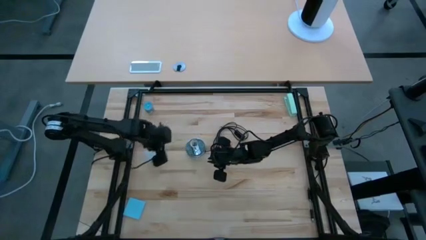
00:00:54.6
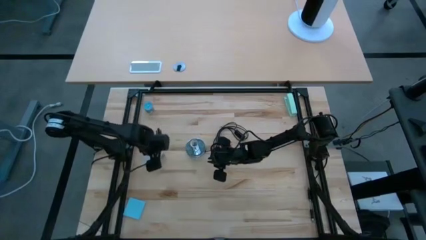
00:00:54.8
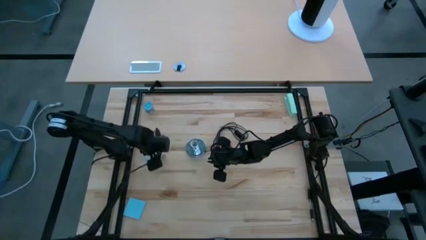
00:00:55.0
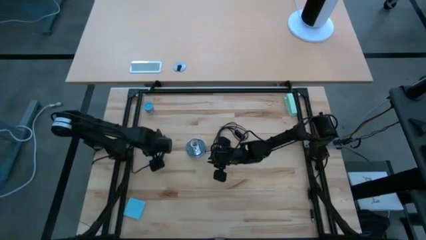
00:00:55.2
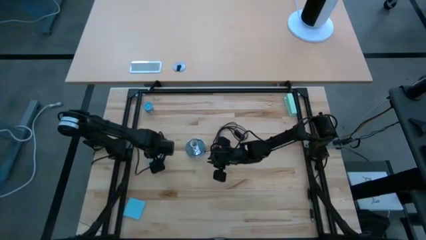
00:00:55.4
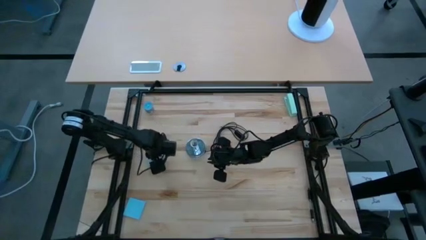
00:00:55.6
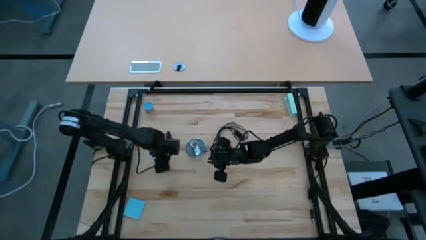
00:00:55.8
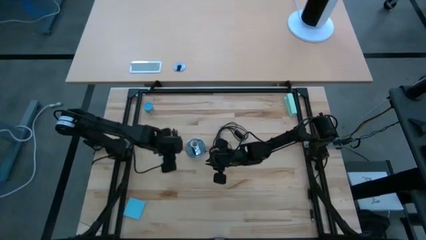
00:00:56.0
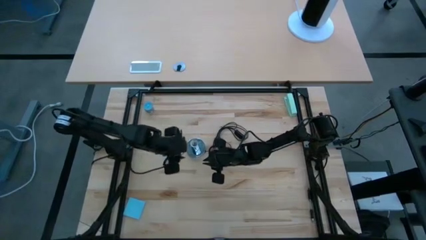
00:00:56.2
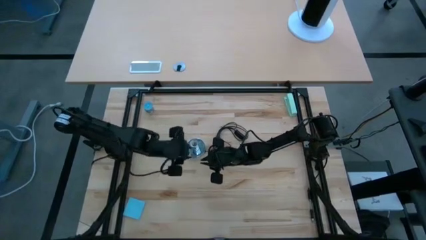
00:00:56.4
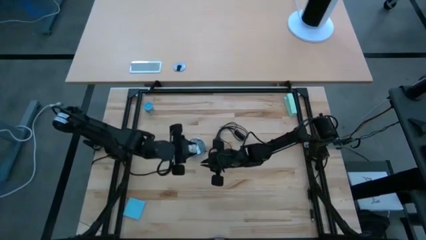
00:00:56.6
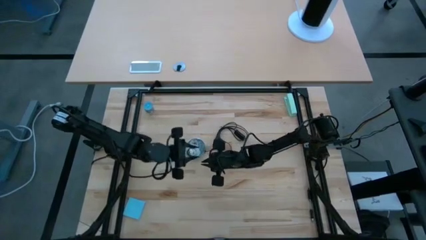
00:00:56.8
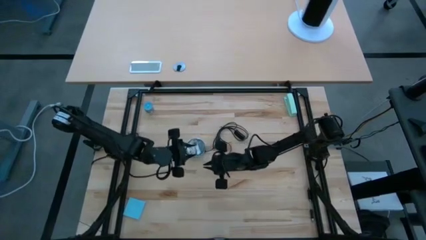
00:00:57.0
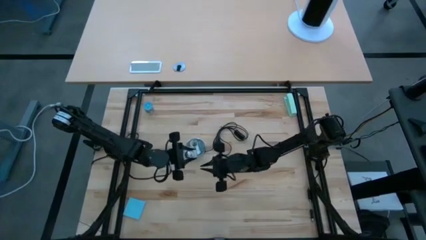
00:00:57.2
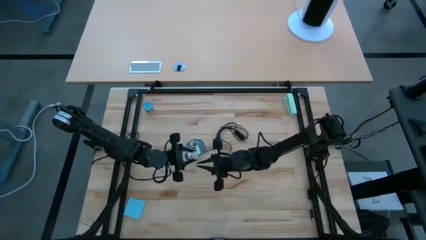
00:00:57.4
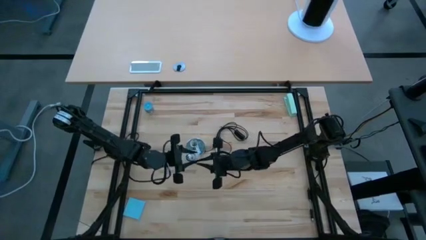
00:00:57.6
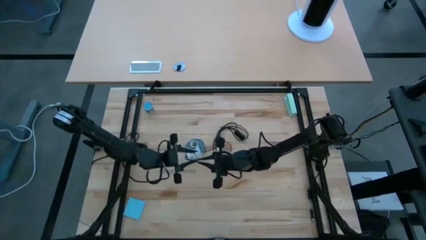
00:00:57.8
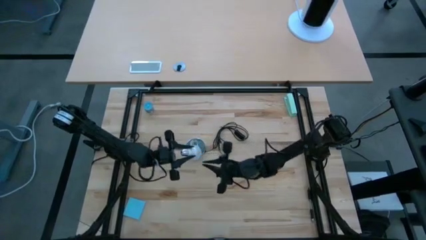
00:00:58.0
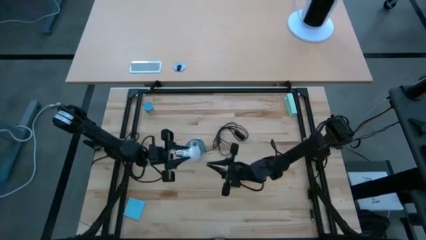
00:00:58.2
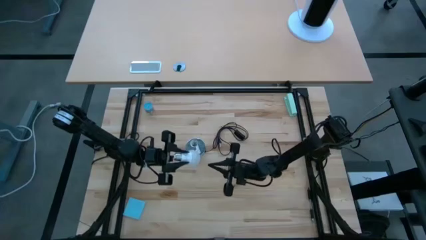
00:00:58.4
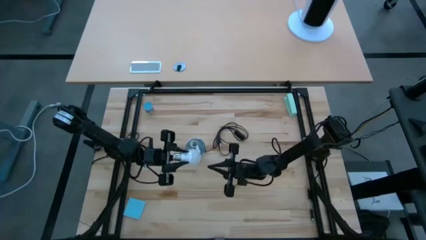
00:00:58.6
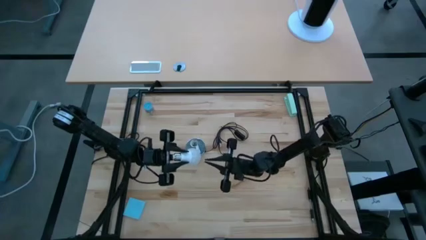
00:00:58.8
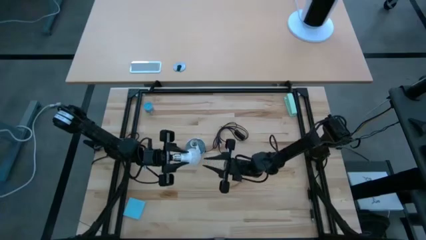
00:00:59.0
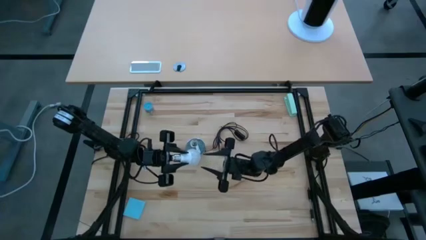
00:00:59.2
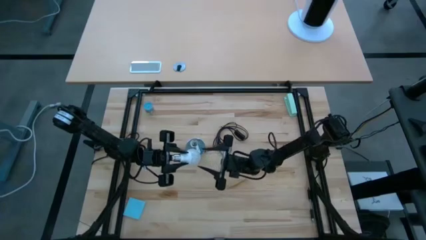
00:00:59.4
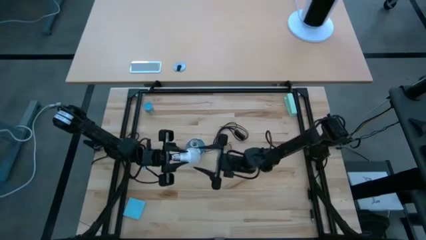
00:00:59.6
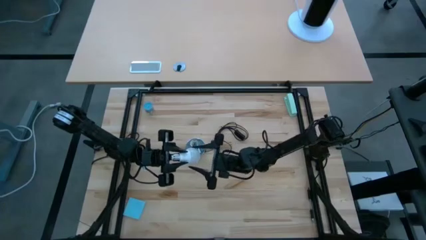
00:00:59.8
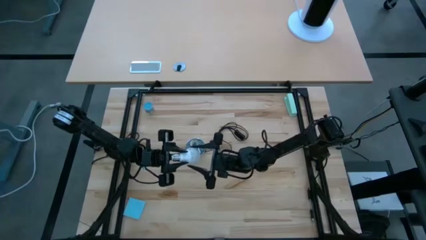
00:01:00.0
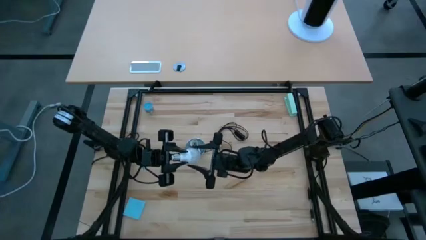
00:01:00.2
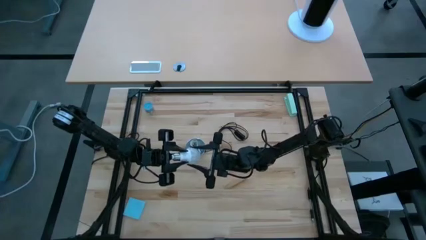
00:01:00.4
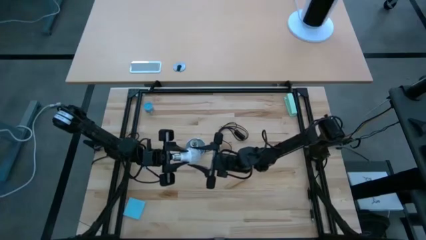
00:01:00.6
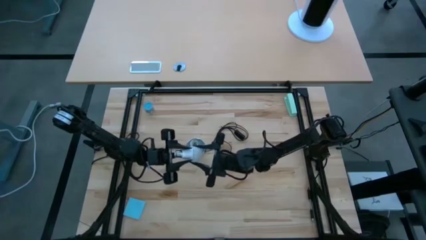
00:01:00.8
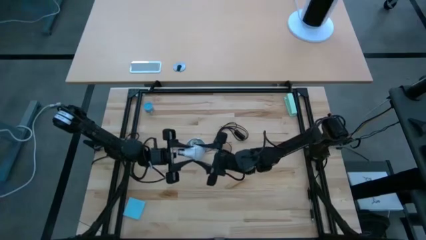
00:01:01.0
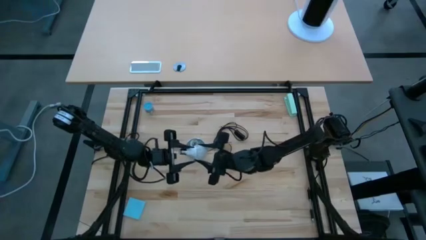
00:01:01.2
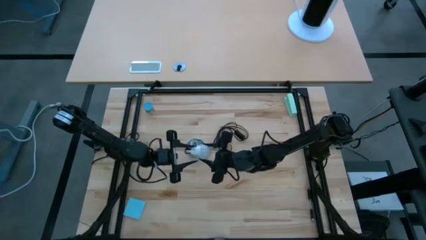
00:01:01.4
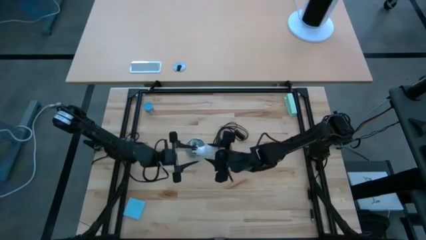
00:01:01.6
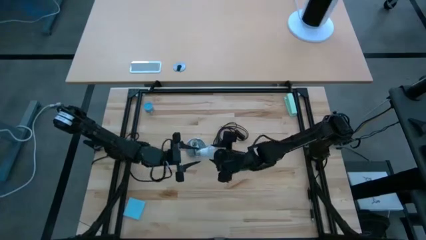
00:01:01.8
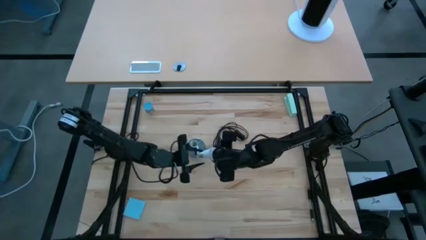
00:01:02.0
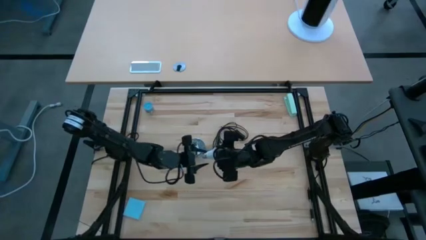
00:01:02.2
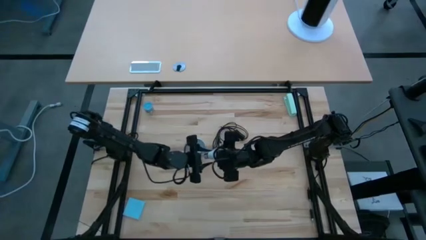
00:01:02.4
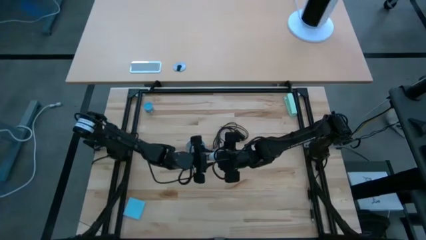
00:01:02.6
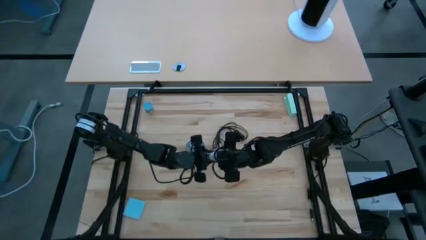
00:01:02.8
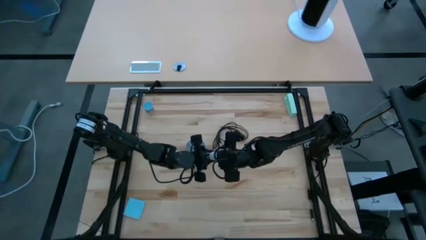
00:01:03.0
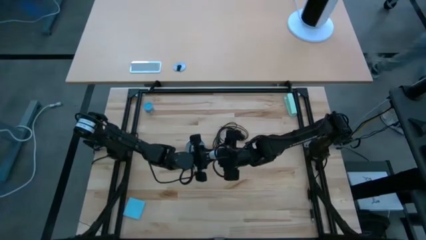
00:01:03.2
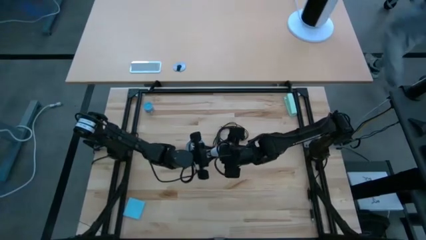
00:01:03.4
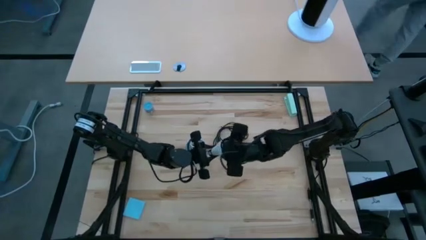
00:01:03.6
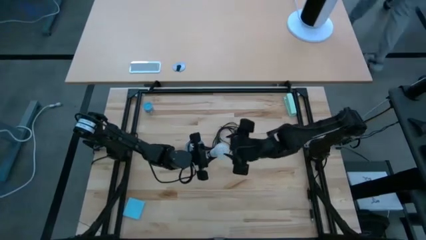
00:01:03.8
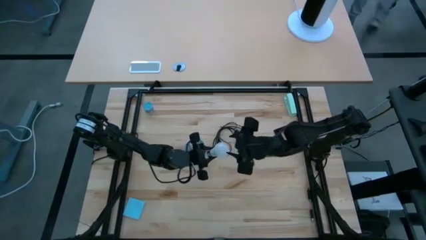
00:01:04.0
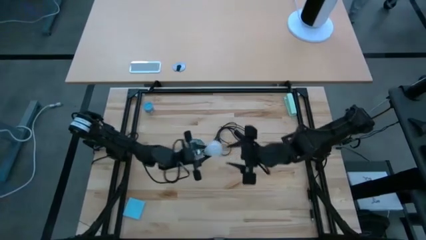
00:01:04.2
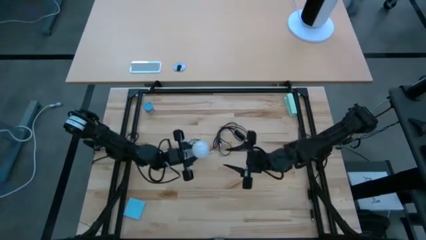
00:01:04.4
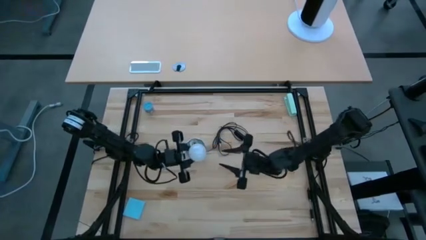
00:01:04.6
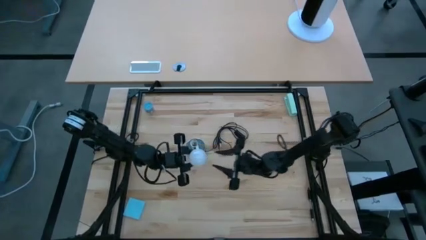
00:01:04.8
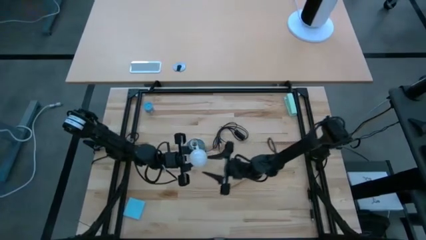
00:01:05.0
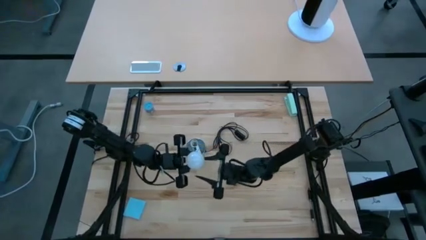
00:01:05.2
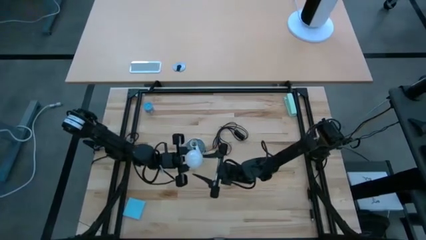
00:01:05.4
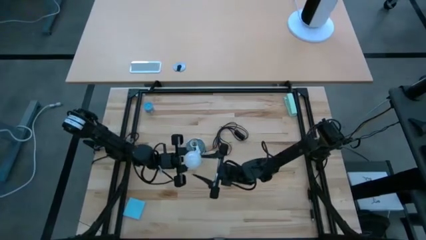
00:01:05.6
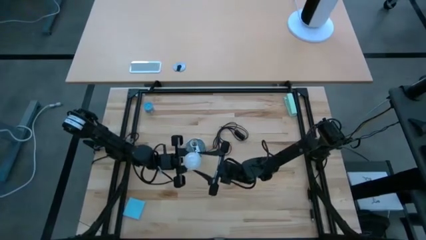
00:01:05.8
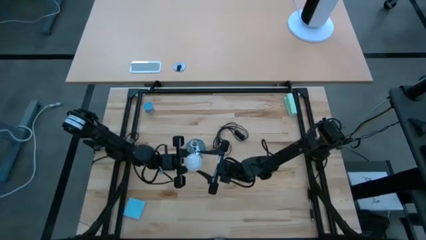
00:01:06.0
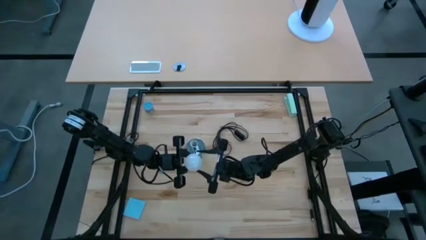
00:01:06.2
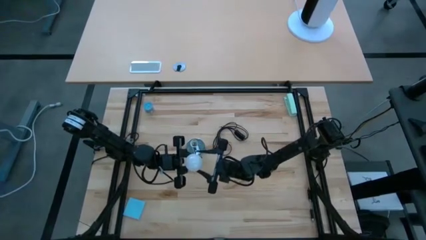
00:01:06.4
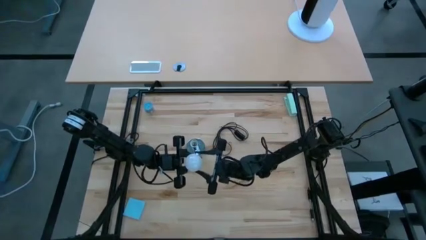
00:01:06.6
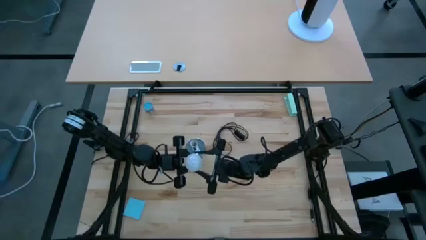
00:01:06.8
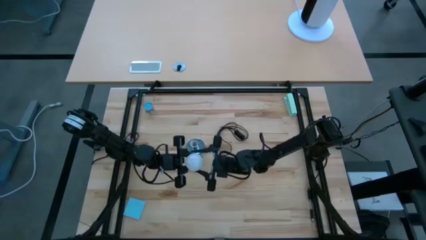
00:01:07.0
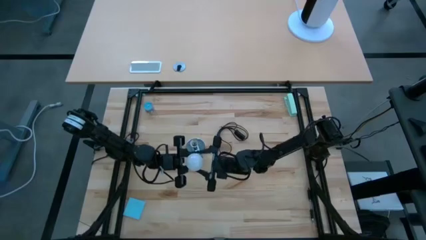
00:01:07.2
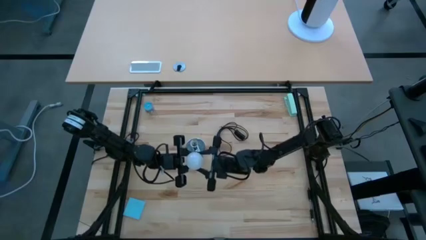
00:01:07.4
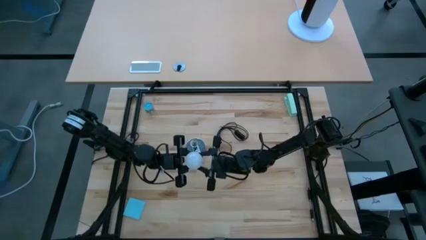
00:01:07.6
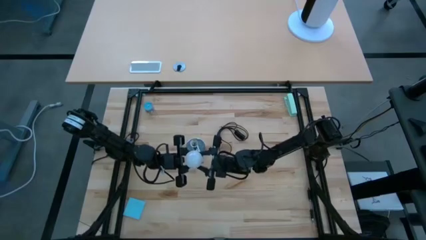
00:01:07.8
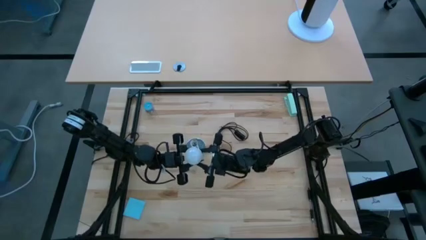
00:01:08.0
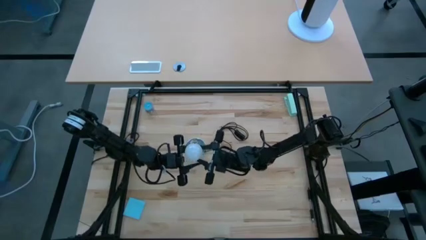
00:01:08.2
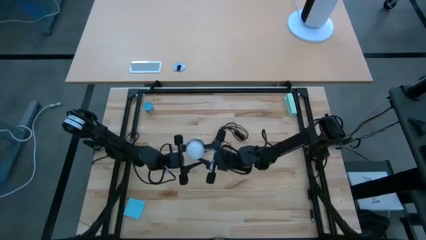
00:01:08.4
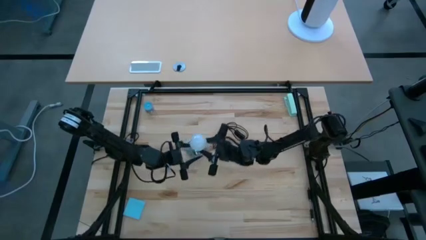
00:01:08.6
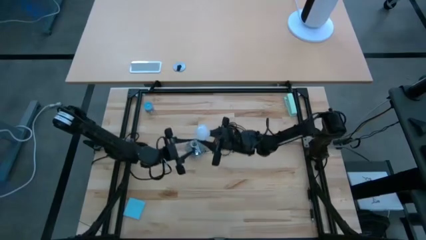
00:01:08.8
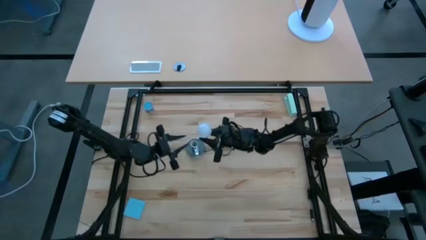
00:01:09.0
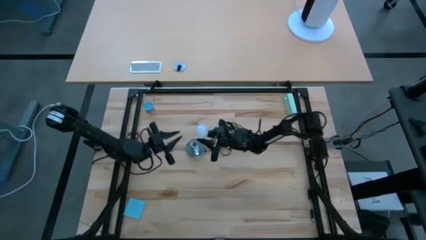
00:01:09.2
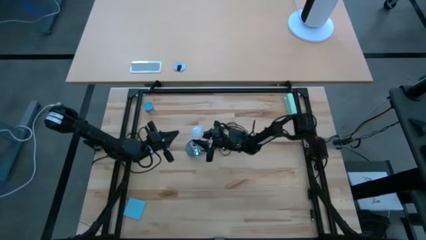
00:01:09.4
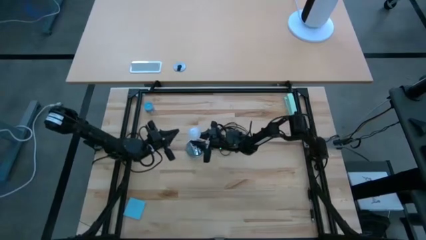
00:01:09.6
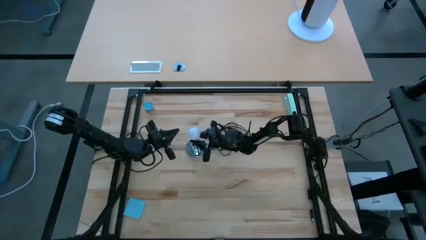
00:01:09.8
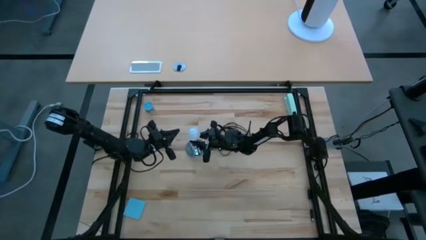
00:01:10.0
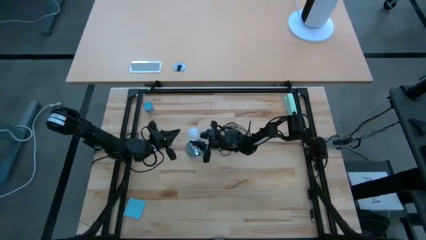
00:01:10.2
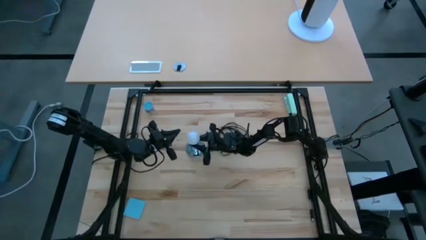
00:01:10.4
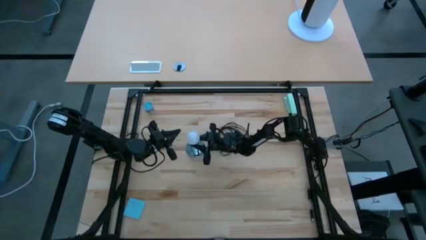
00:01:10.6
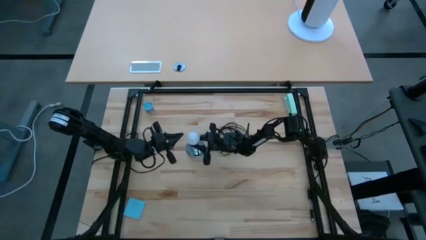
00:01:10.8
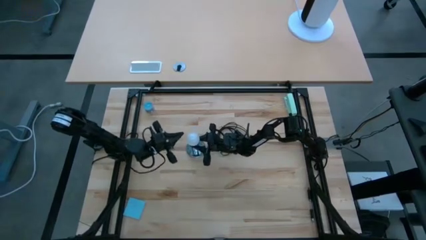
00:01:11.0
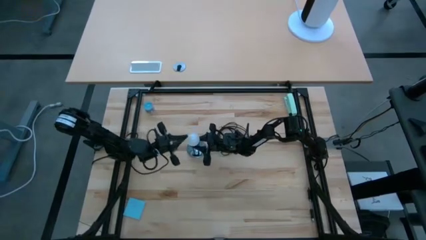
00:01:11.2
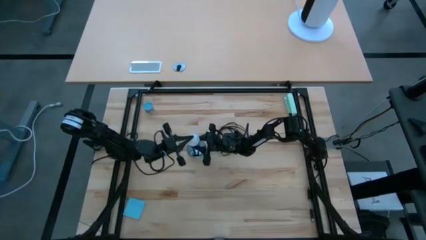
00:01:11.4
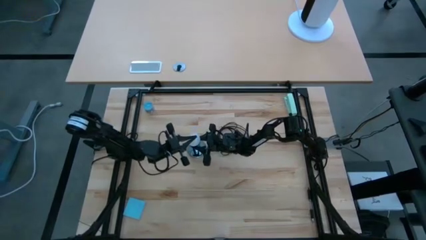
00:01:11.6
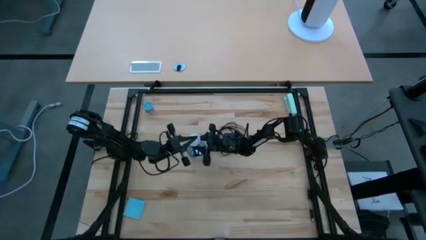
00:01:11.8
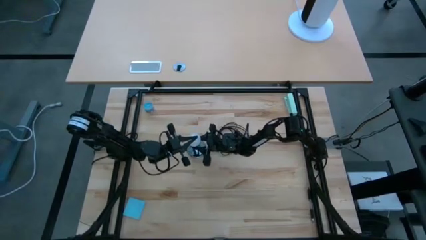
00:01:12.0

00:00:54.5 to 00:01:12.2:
Task: Screw lightbulb
Insert the lightbulb into the lamp
